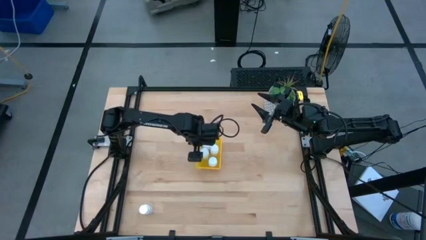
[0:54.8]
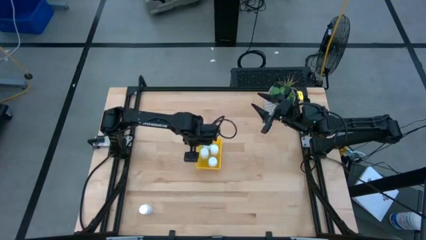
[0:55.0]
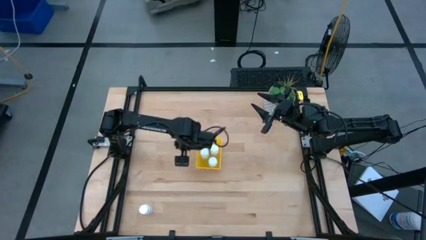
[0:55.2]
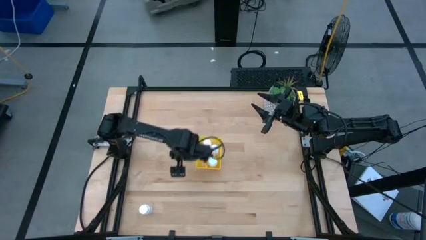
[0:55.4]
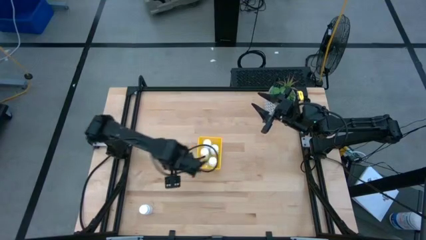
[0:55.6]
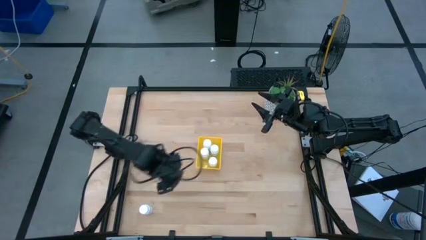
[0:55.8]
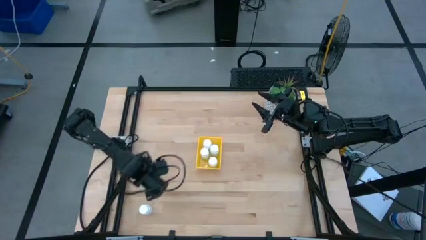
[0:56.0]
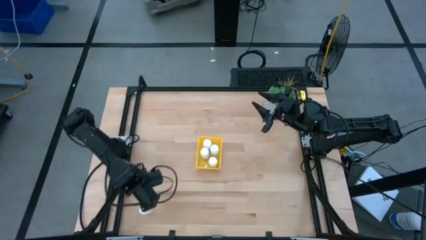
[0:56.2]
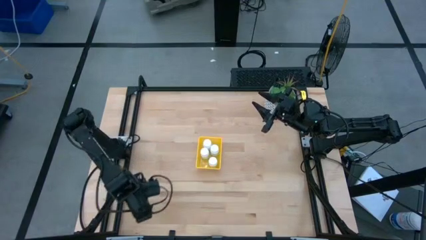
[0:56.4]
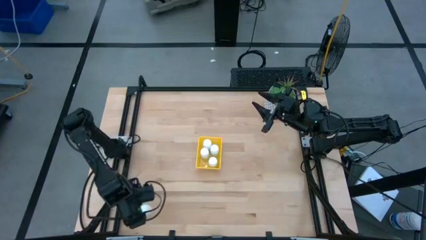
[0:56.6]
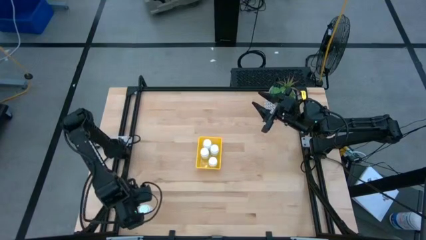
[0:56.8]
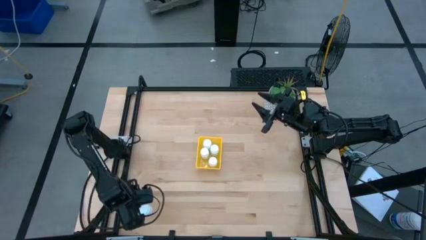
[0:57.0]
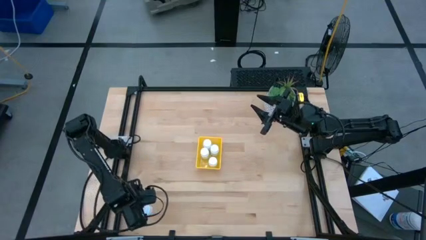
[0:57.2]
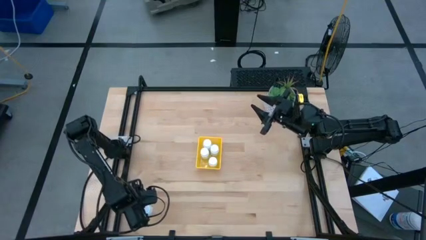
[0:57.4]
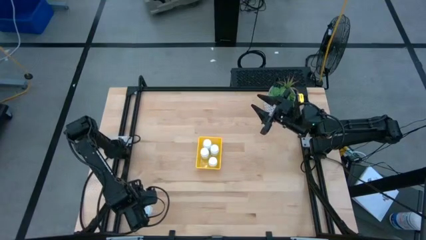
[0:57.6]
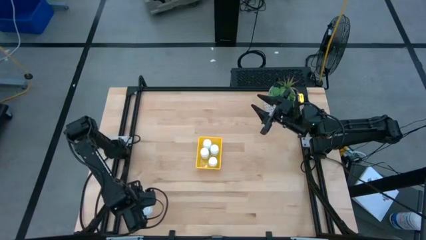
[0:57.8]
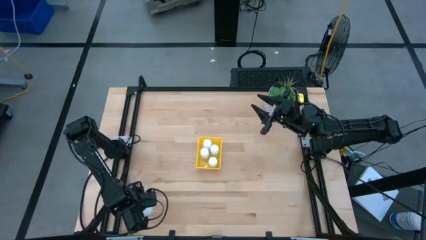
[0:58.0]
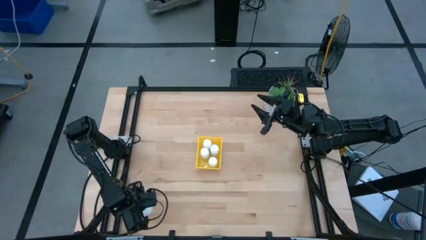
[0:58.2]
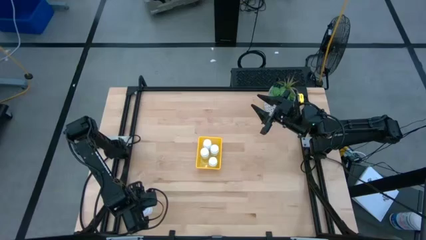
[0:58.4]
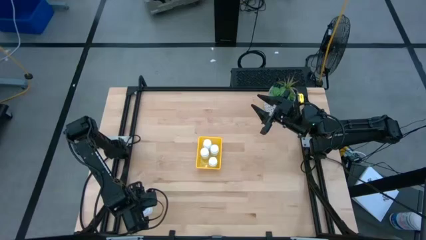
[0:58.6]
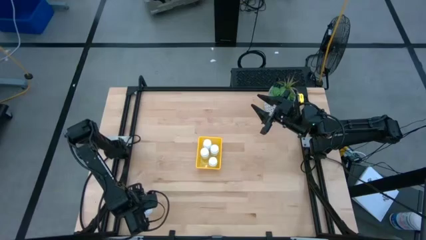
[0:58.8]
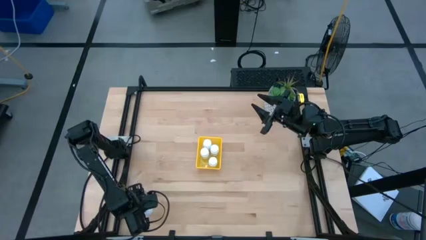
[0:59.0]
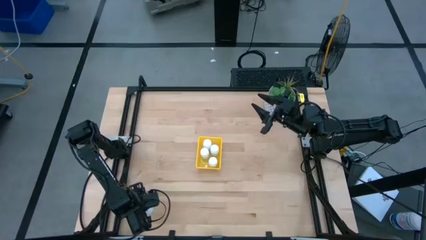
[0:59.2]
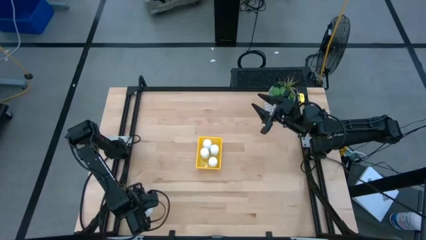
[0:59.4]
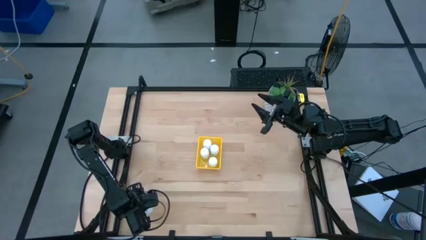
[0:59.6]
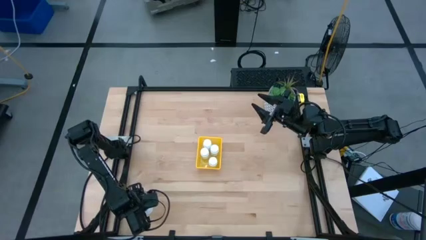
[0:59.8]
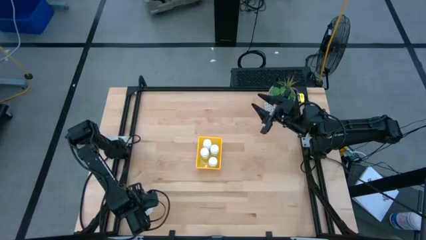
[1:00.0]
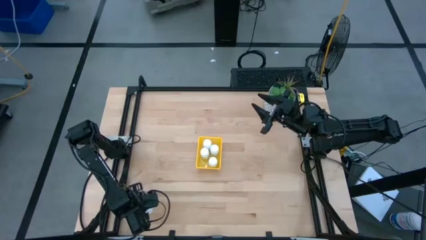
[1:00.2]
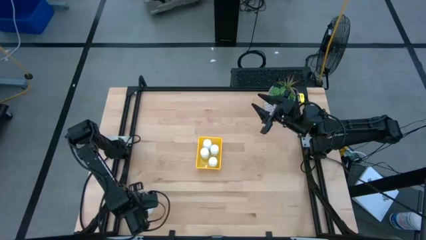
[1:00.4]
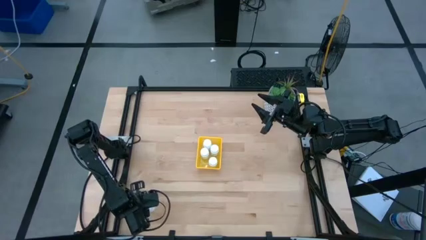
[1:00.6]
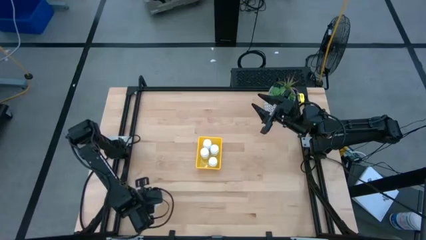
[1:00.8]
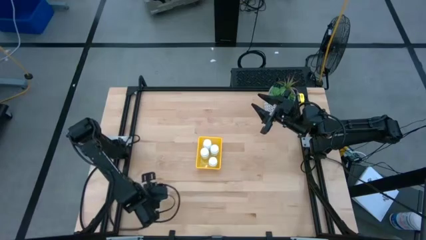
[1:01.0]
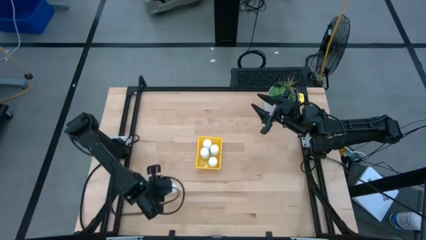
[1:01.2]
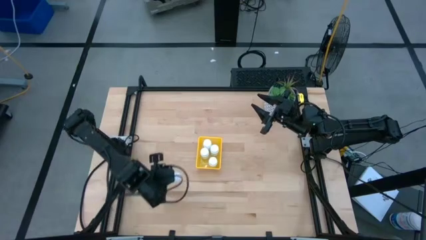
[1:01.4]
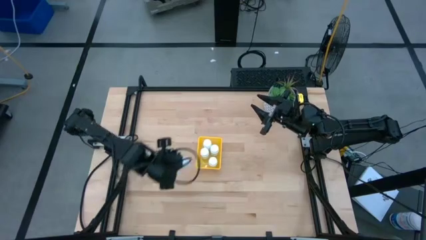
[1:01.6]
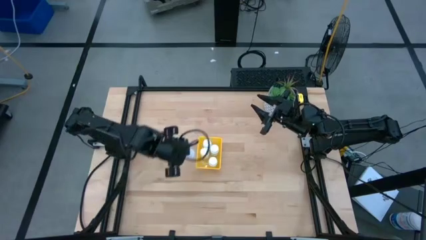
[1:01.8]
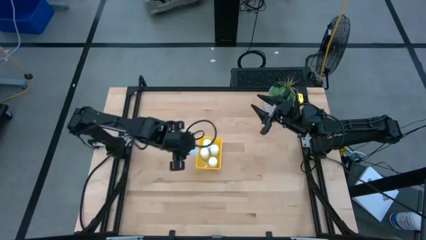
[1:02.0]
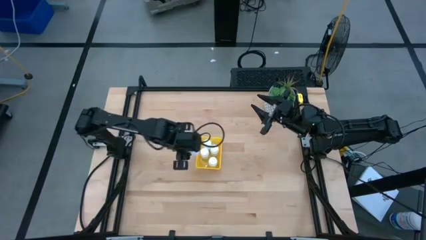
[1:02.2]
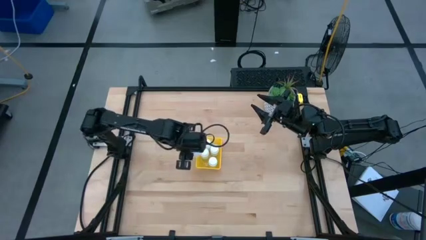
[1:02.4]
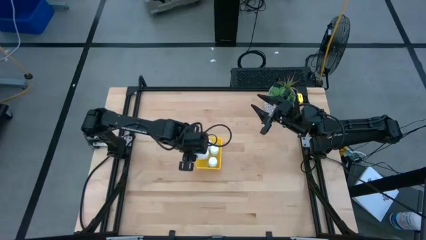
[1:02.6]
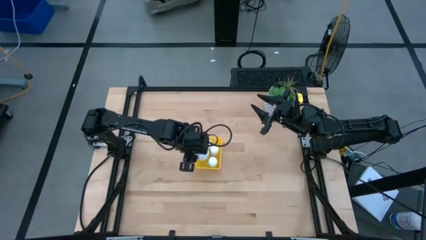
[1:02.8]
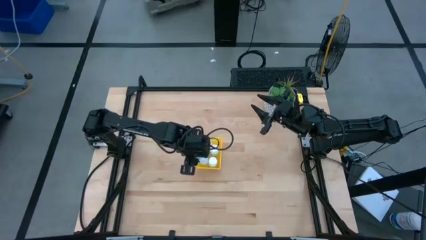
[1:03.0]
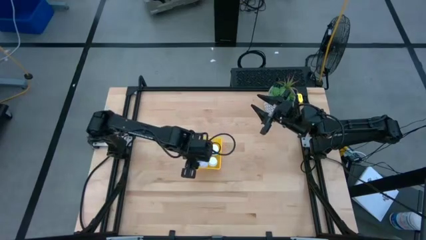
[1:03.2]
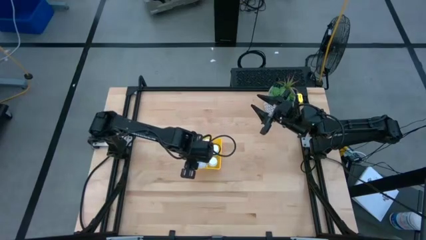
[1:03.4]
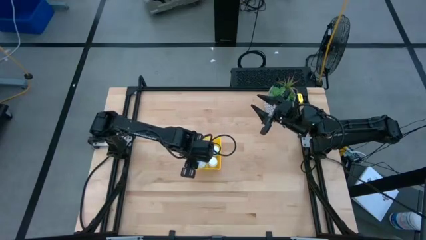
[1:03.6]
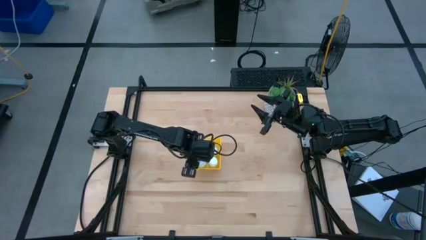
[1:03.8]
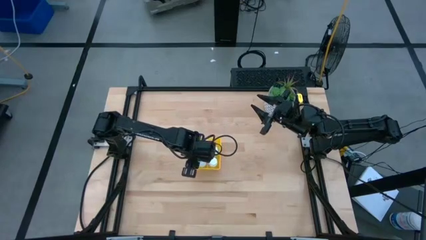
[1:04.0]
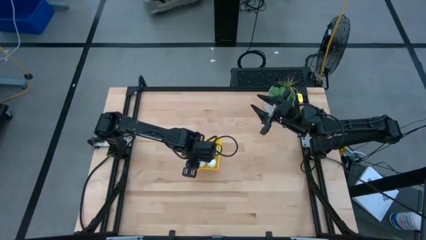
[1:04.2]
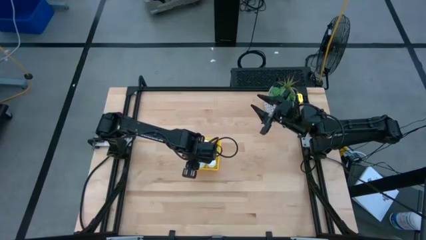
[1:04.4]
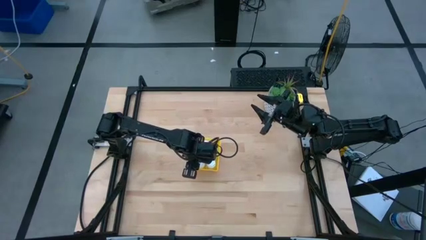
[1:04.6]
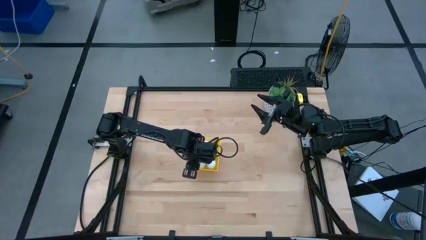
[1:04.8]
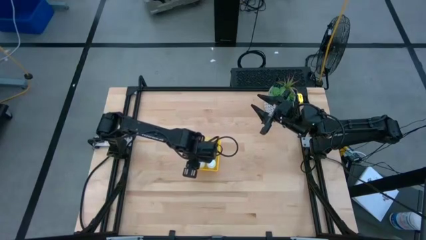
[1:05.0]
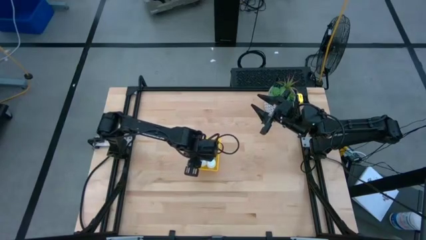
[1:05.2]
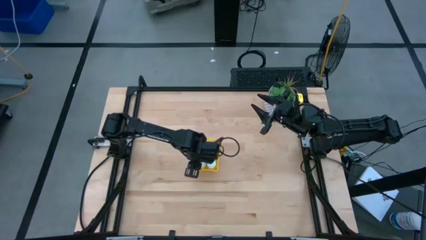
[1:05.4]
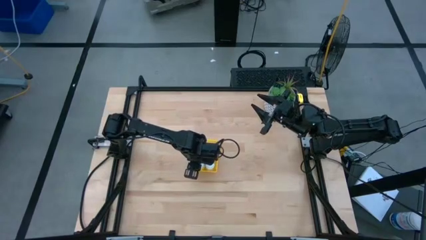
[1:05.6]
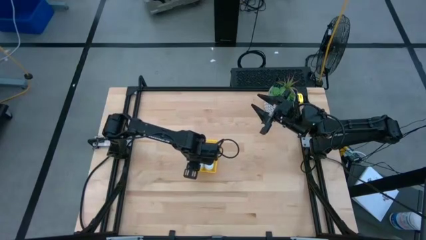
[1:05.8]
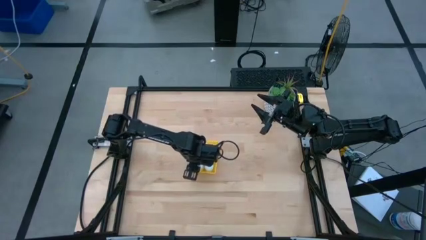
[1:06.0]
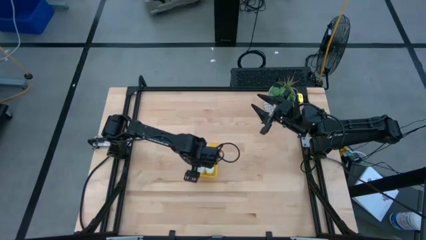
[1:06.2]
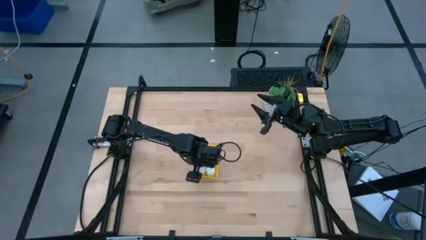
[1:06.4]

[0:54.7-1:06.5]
Task: Pick and place pill bottles into a basket
Put the white pill bottle into the yellow bin

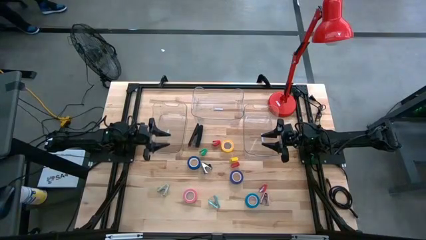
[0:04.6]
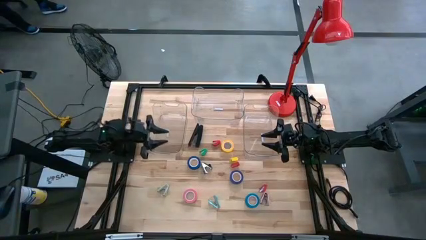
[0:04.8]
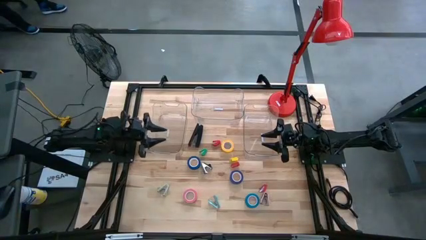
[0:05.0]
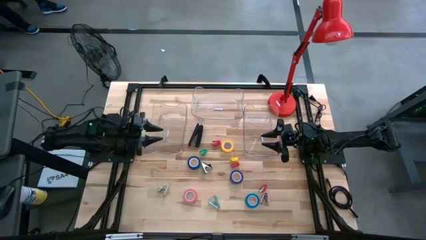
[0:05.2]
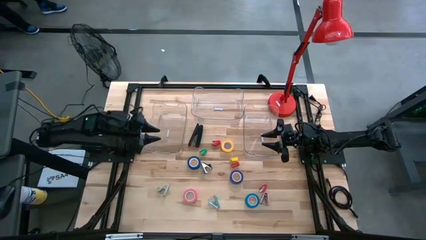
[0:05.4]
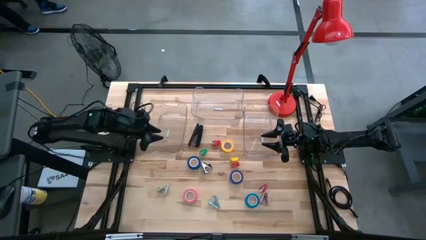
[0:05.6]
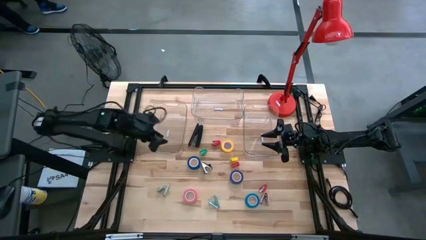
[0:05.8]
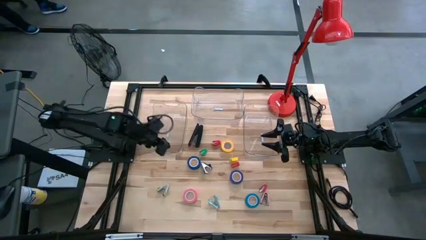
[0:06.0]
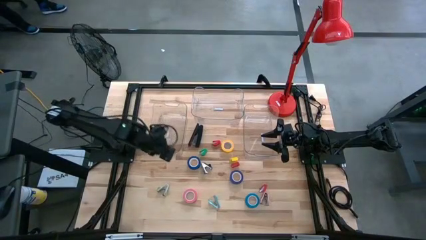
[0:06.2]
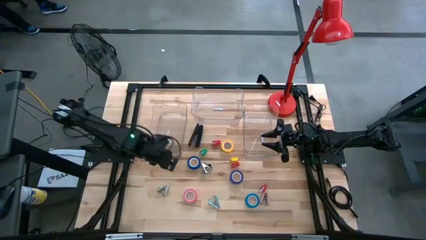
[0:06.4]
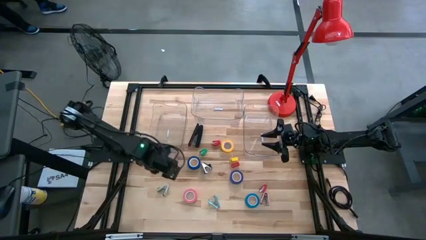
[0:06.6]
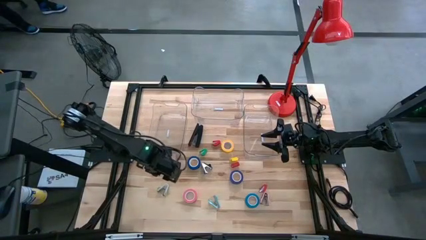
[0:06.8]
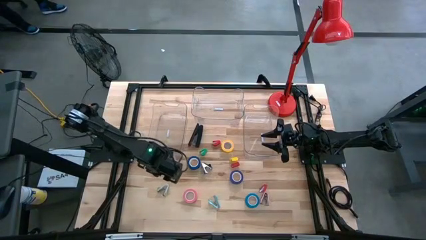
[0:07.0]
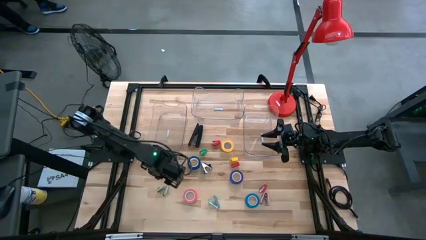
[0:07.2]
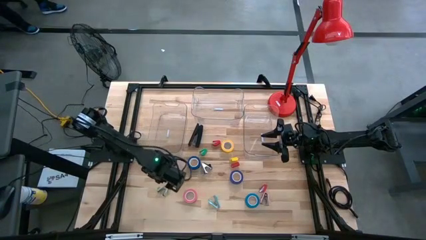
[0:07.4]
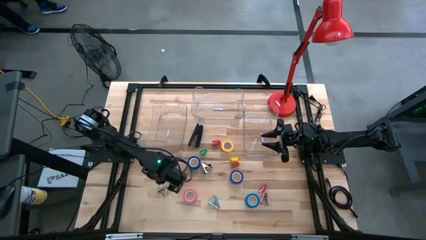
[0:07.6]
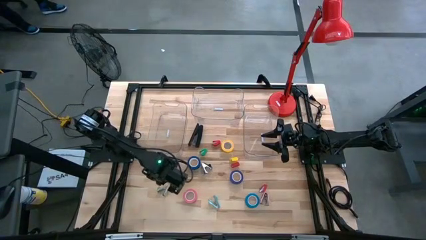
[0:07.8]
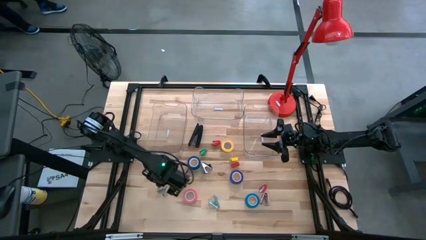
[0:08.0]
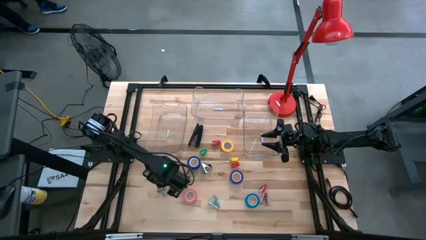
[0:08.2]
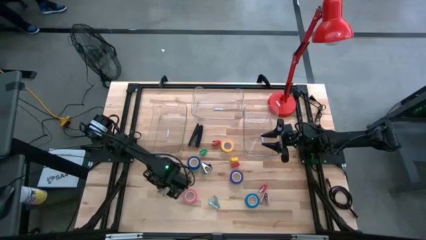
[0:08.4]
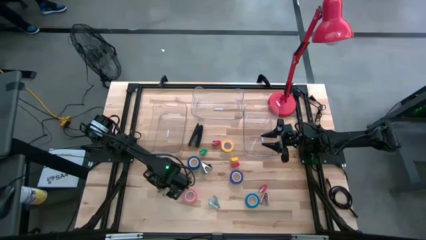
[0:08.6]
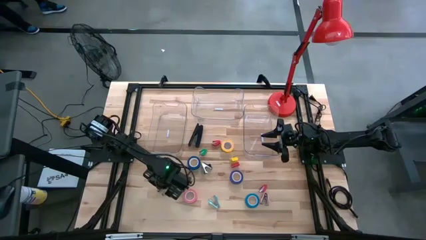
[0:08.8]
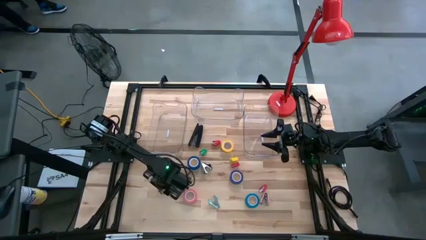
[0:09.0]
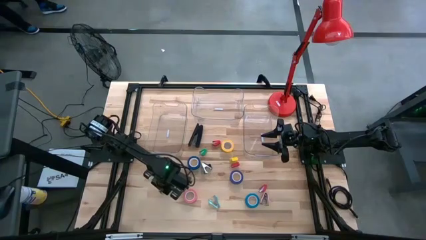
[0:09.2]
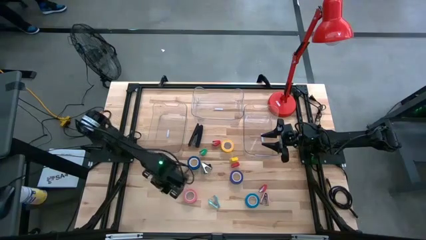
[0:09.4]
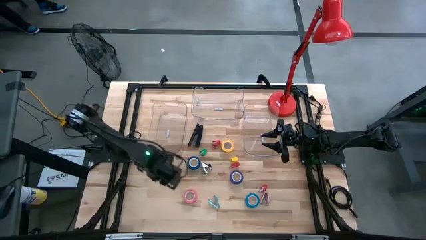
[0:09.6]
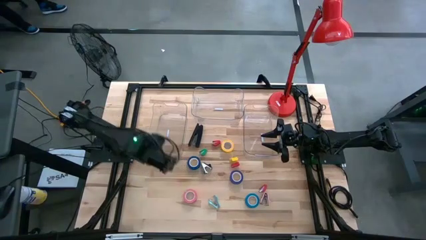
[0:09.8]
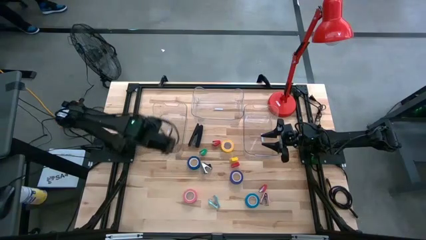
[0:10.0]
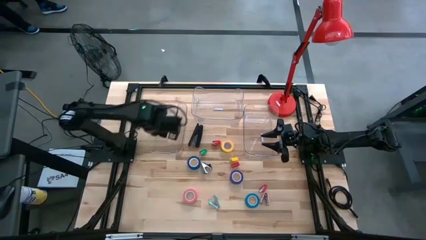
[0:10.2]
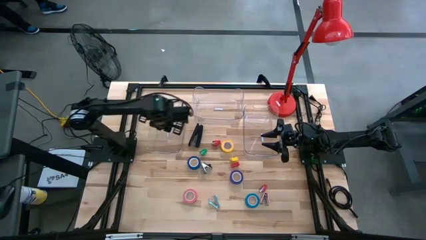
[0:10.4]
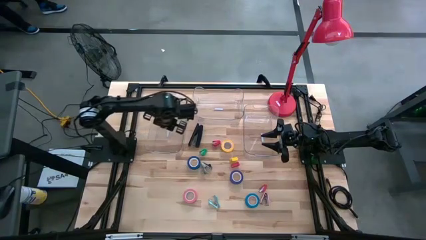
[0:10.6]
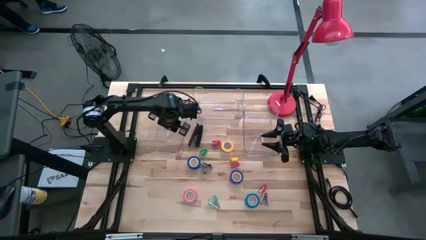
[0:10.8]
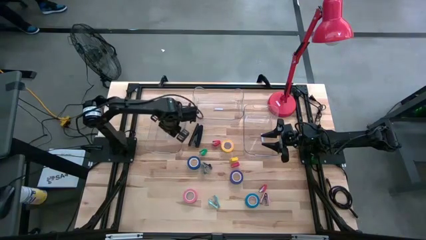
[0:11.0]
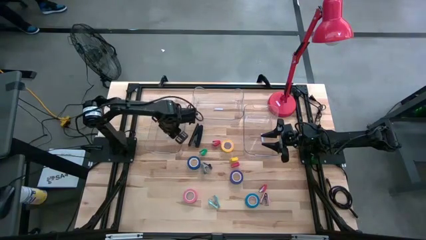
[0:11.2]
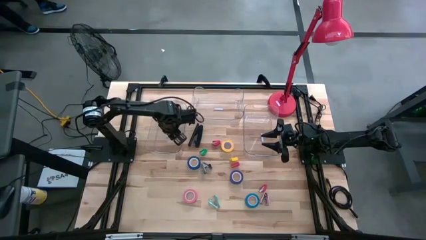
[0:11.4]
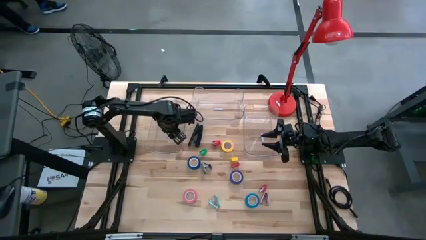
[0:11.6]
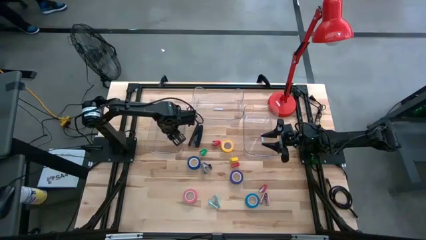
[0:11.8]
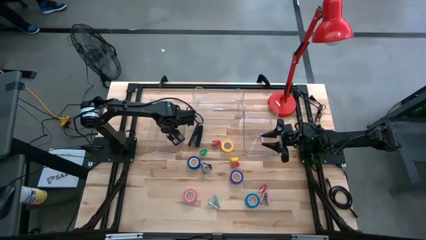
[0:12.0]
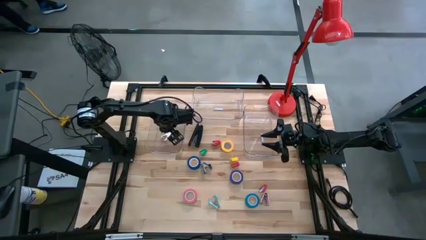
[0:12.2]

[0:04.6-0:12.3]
Task: Pick and place Stapler, Stapler remover, tape
Put the grey staple remover into the bottom left transparent bin
